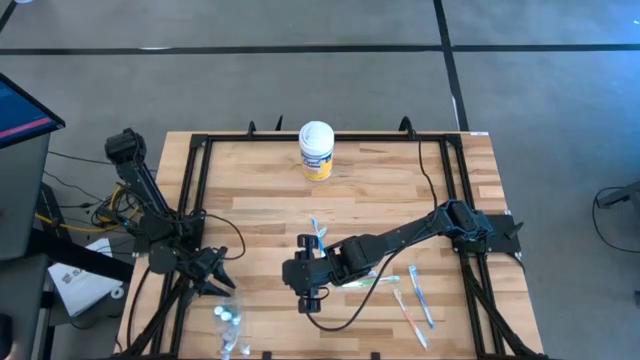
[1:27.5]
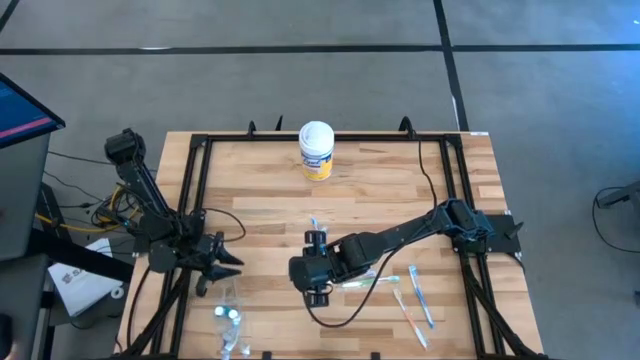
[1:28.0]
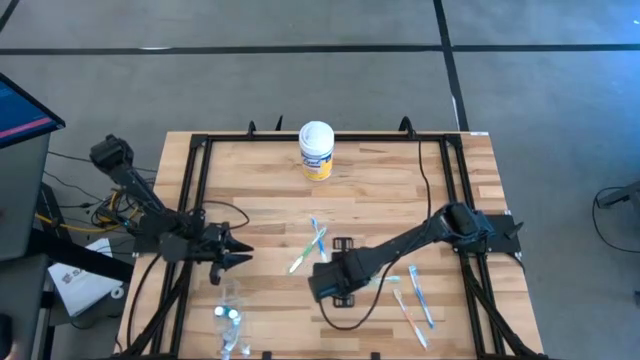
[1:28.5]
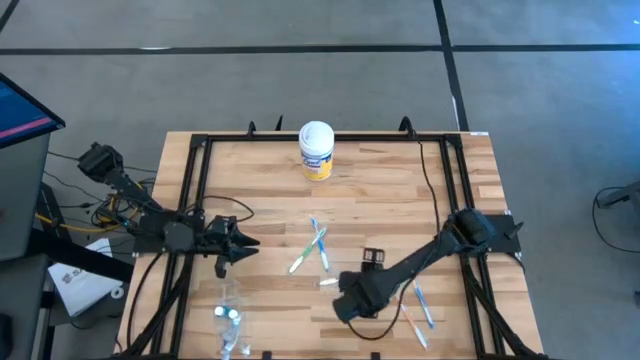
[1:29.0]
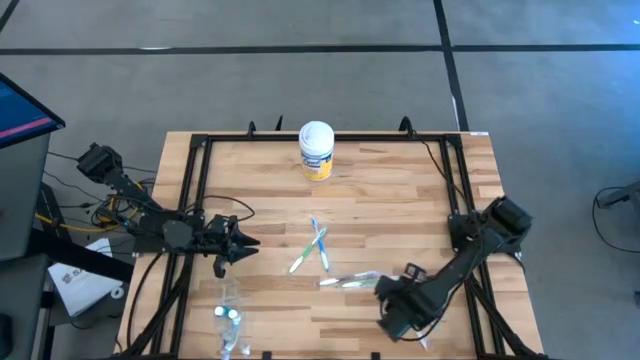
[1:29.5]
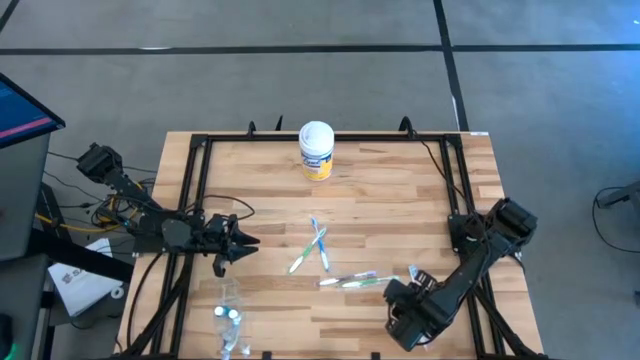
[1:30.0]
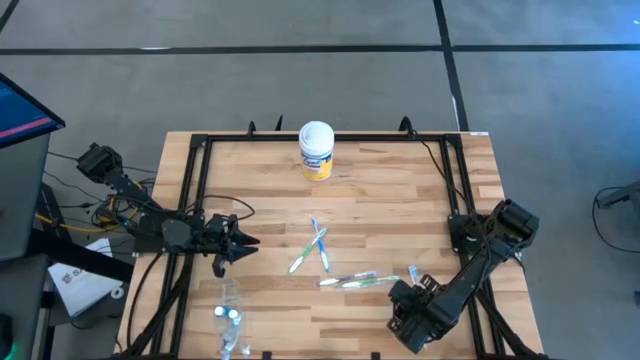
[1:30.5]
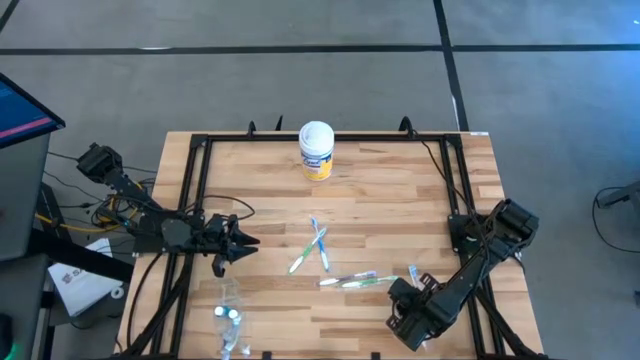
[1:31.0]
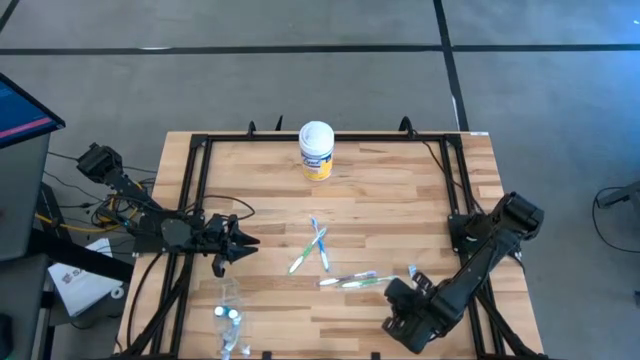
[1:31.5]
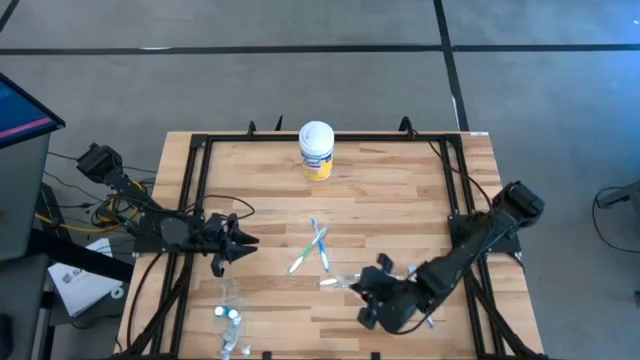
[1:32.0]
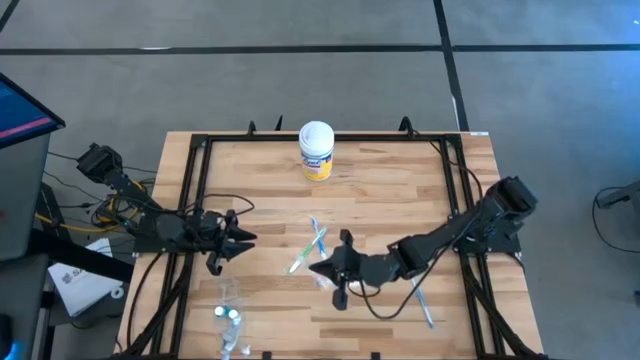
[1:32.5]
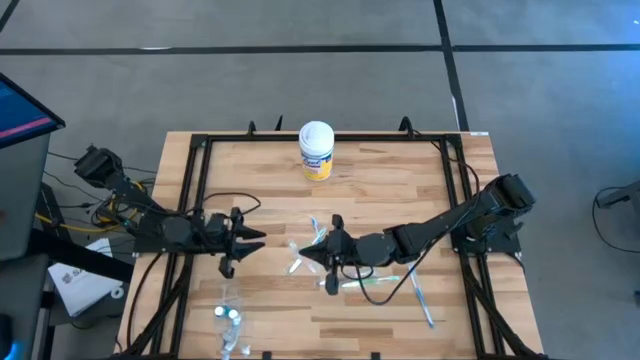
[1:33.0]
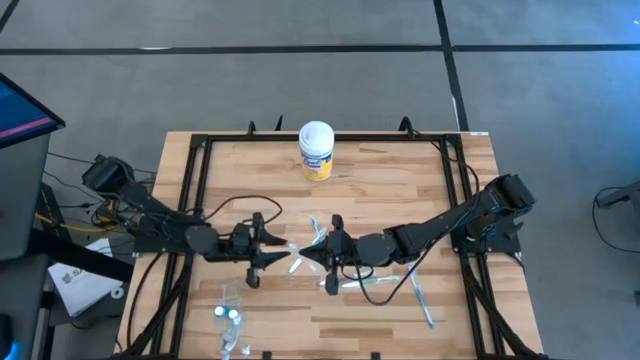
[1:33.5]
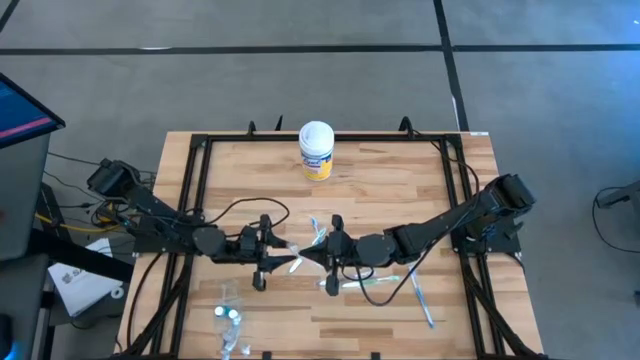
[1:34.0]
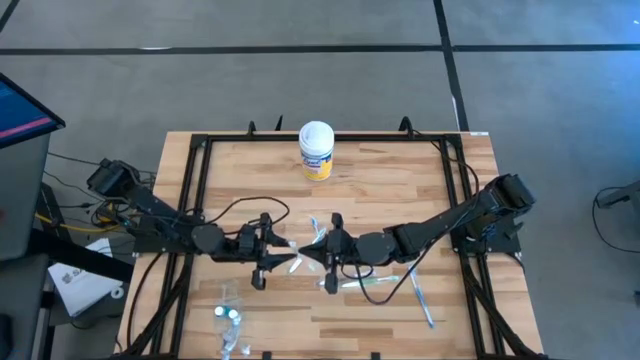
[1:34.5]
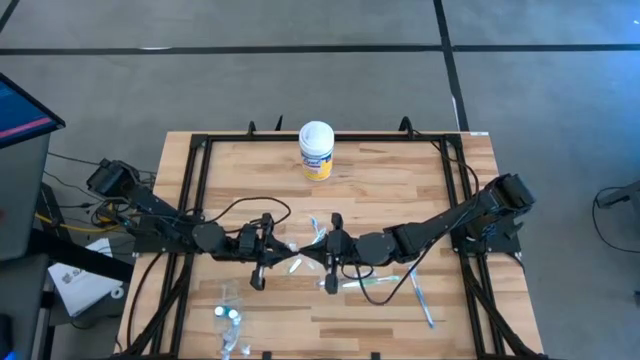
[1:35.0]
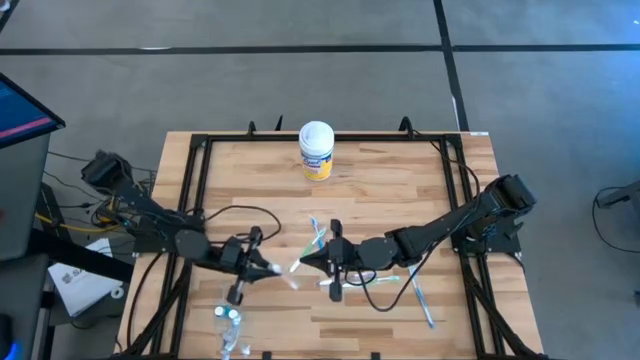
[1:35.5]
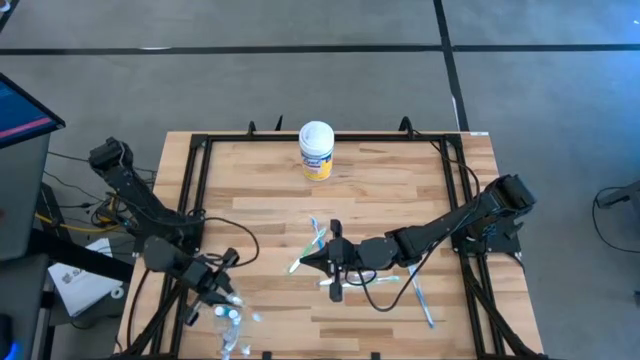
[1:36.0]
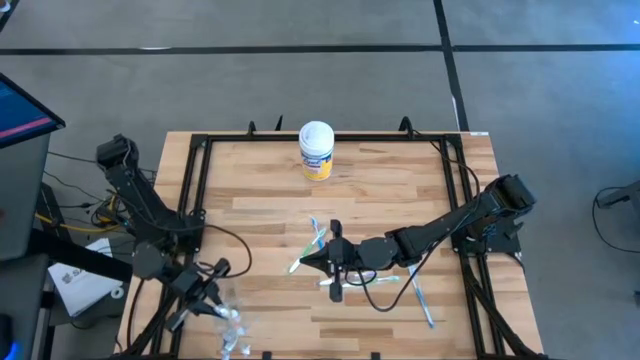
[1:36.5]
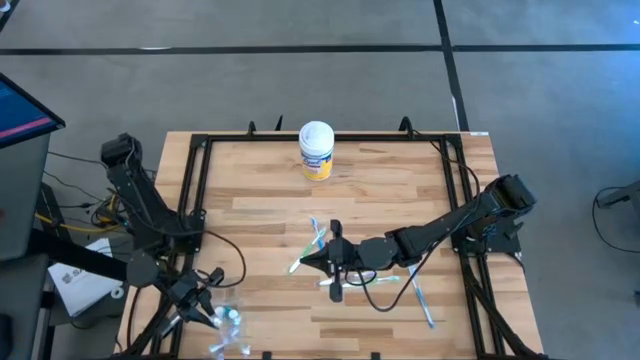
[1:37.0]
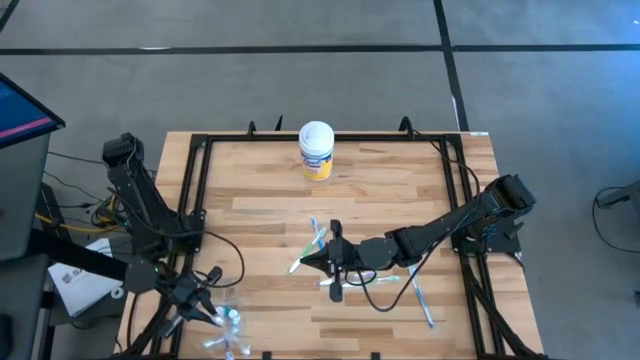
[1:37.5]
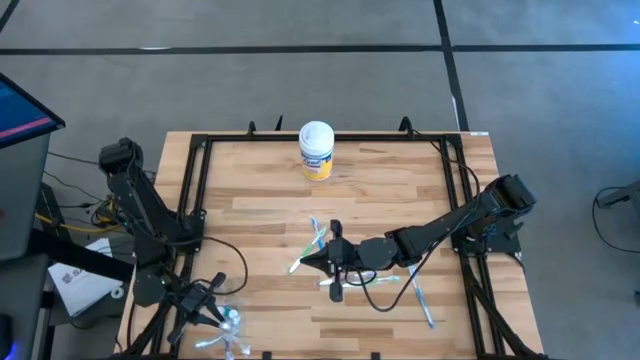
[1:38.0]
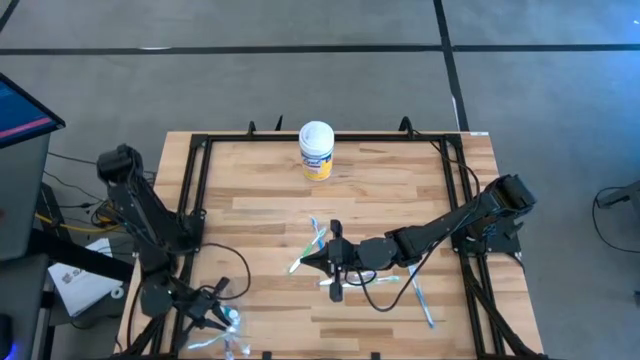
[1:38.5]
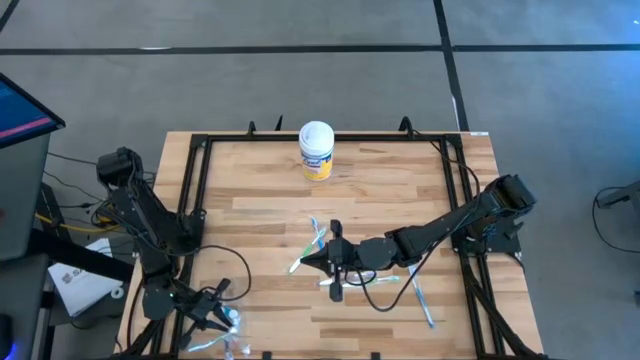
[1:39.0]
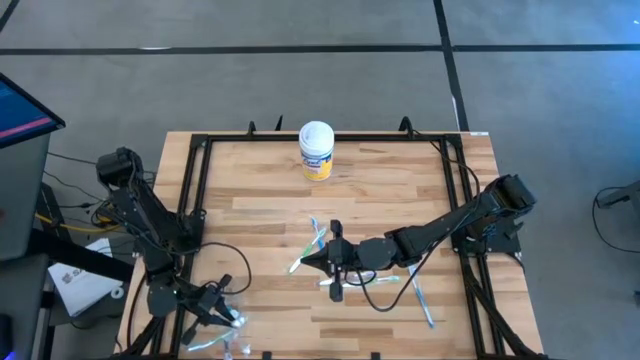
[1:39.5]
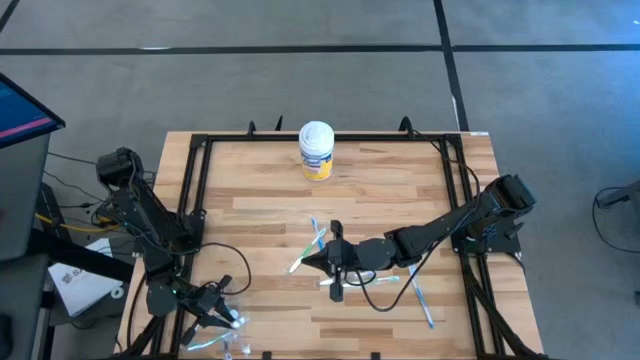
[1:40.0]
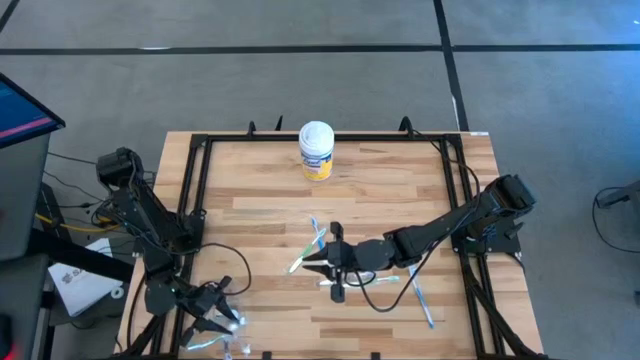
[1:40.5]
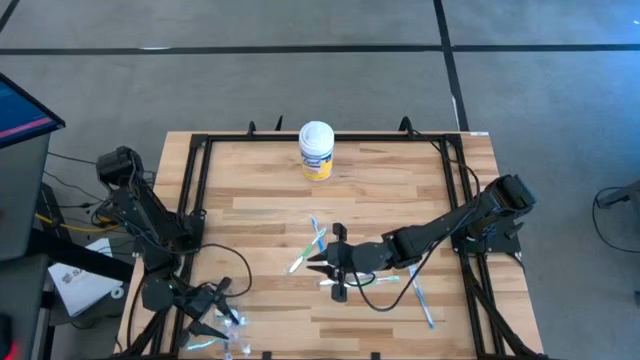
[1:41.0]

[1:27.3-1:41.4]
Task: Pick & Place toothbrushing station
Put the orange toothbrush into the transparent organizer

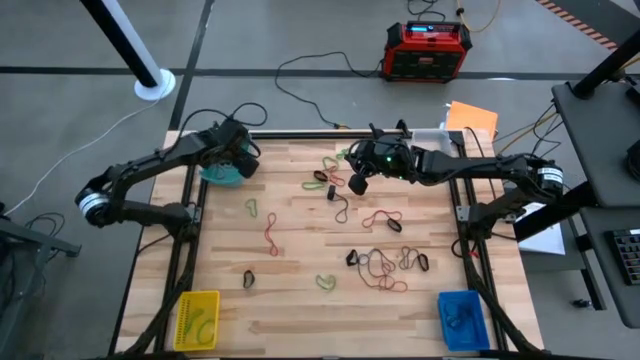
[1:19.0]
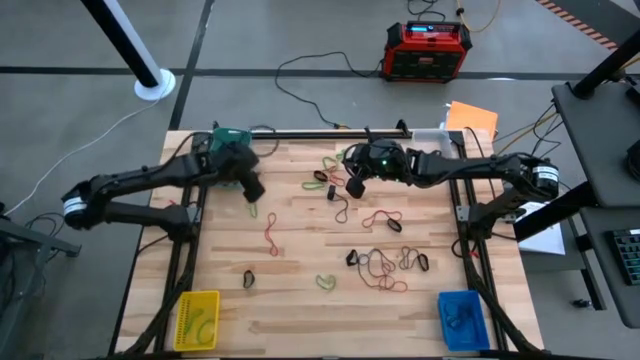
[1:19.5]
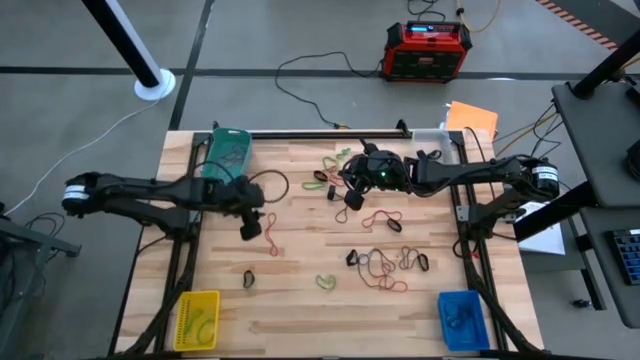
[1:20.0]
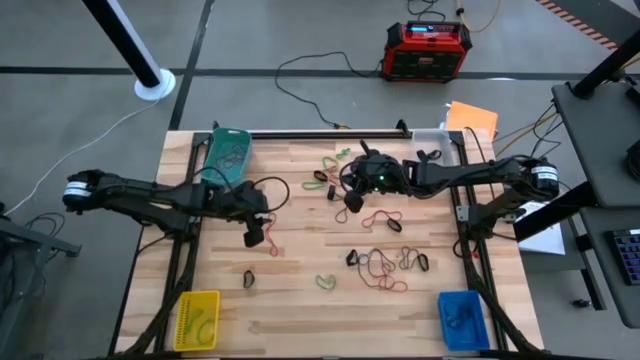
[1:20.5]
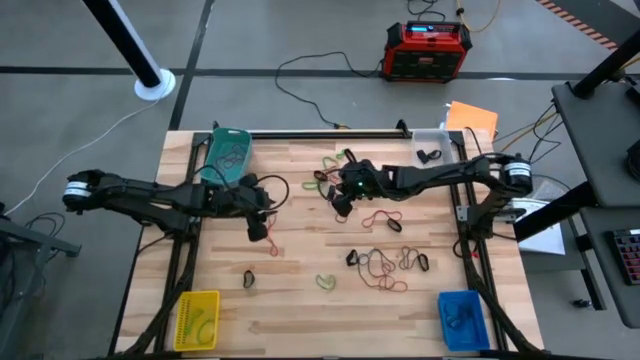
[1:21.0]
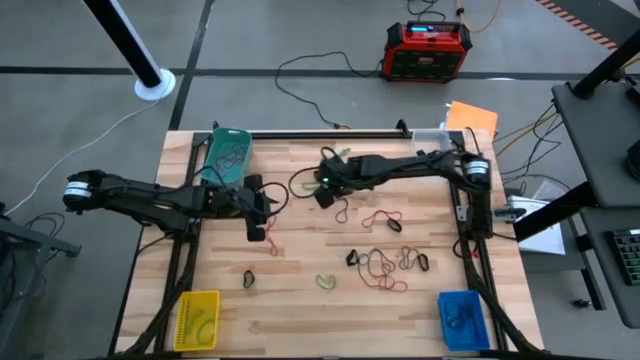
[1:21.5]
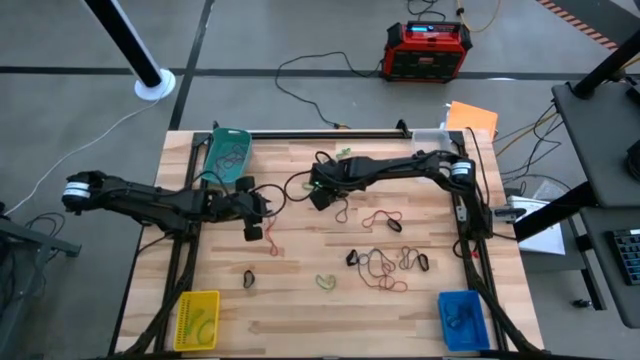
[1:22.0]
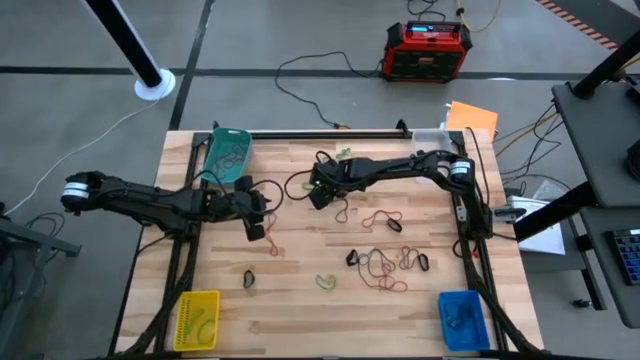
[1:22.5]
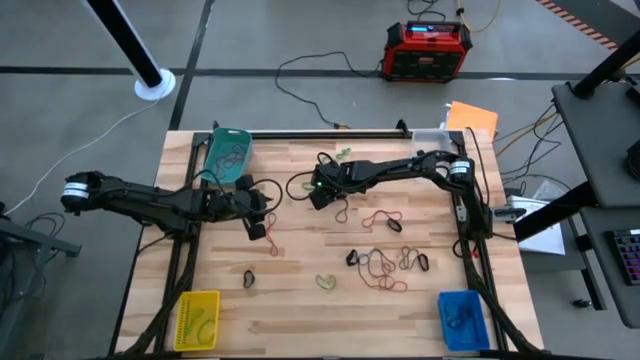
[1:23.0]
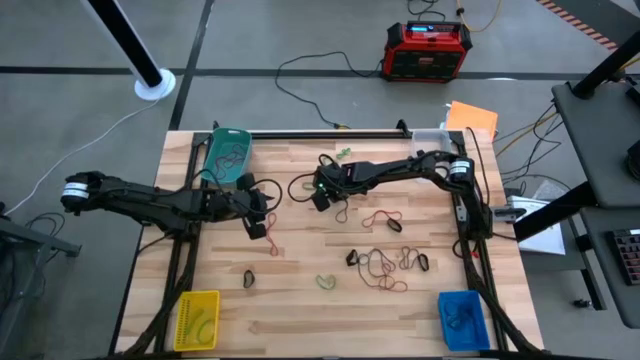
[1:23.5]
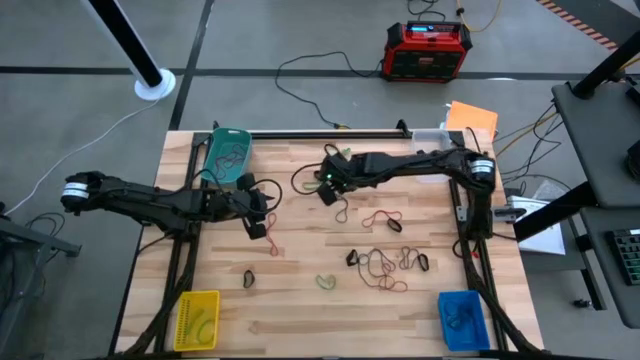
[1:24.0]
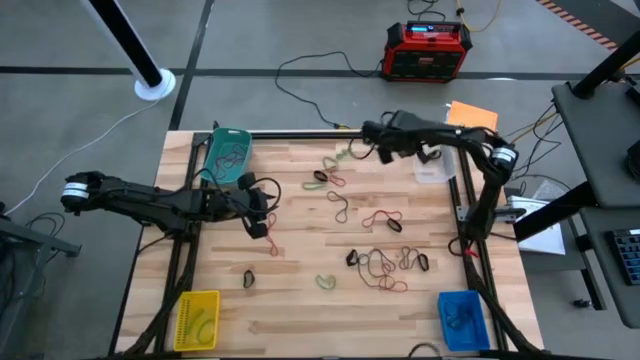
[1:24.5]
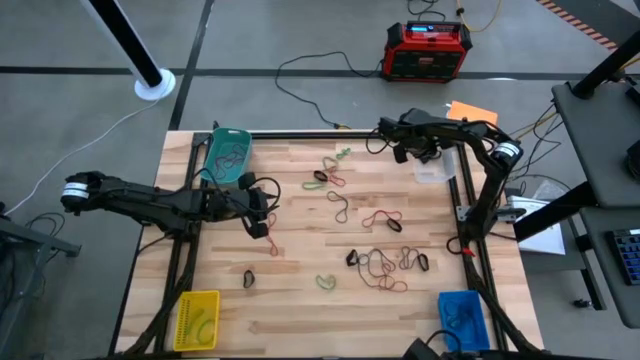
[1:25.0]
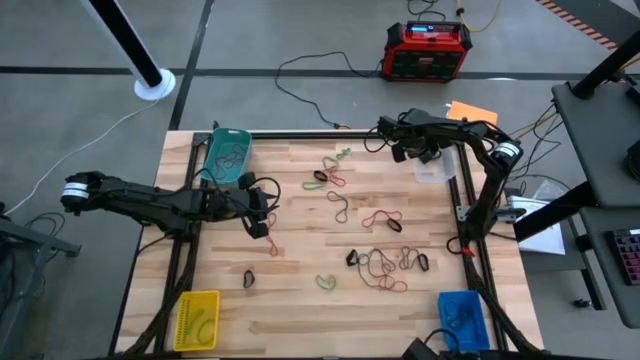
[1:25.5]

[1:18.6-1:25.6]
Task: Sort rubber bands into baskets
Put the black rubber band into the transparent bin
